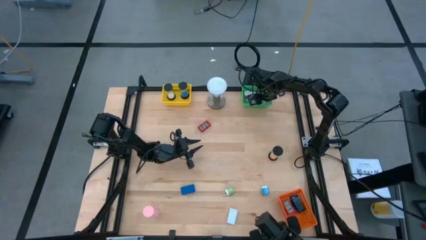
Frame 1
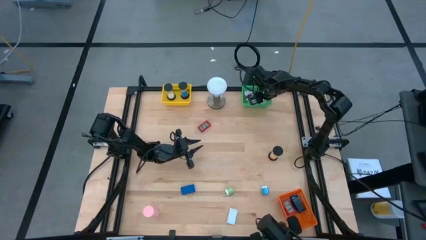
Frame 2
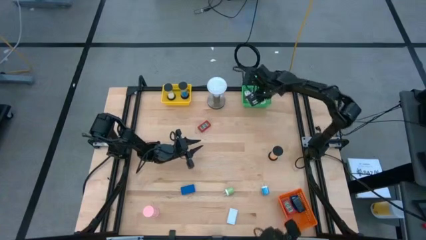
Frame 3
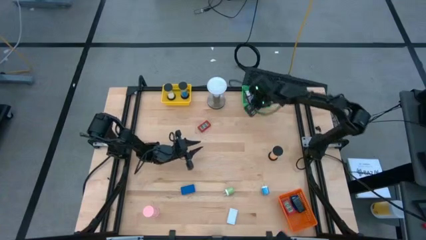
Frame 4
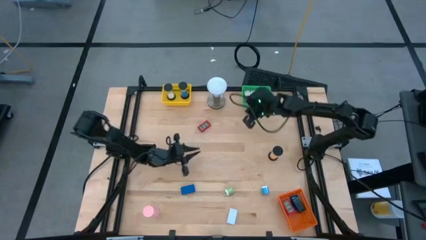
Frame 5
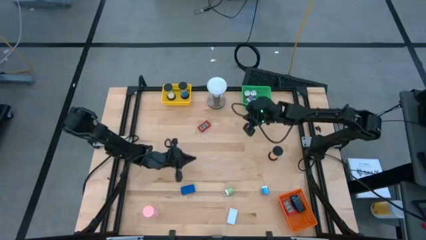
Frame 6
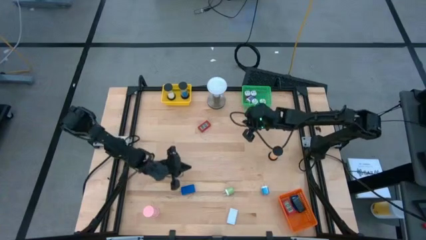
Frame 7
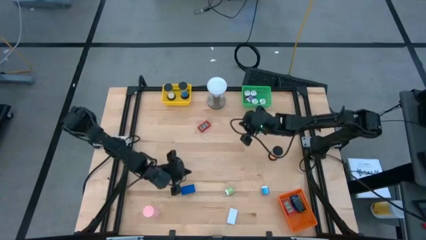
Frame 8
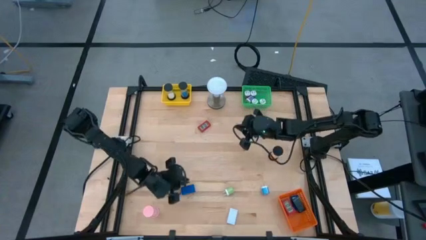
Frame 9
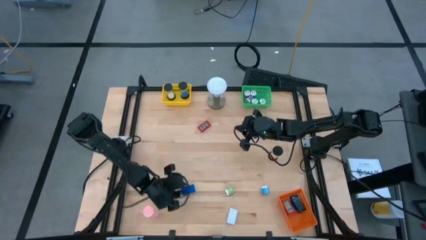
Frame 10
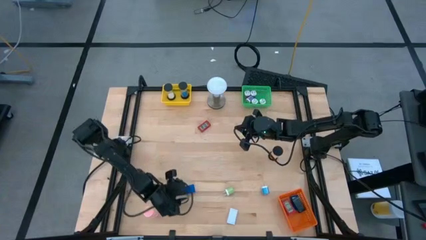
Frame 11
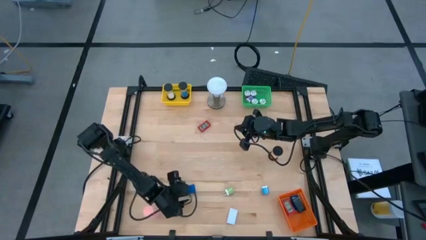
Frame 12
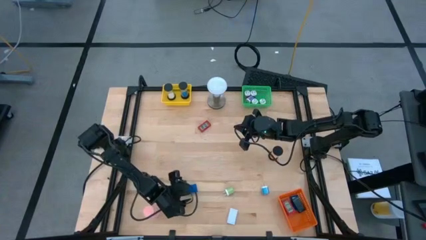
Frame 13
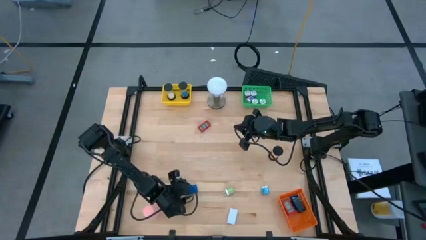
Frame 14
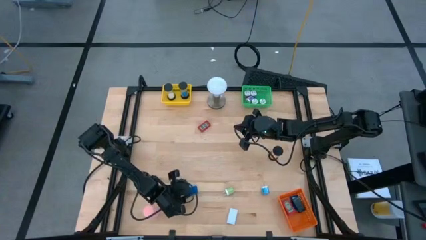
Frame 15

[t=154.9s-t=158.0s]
Task: Pick & Place Office items
Put the blue digital timer into the orange bin

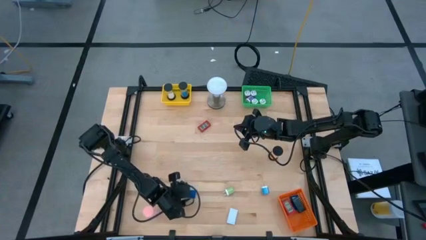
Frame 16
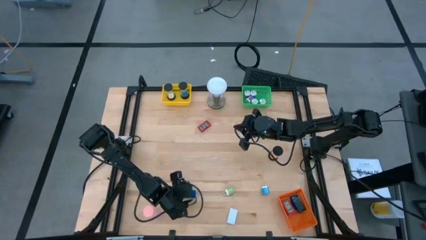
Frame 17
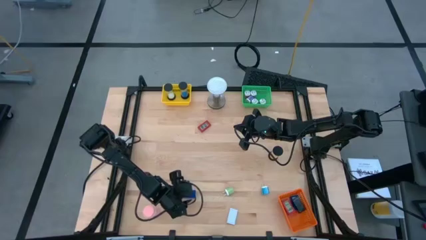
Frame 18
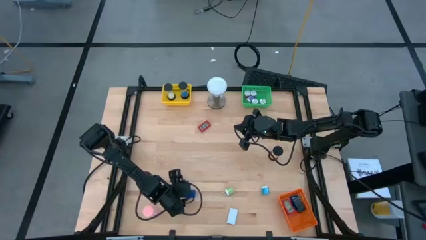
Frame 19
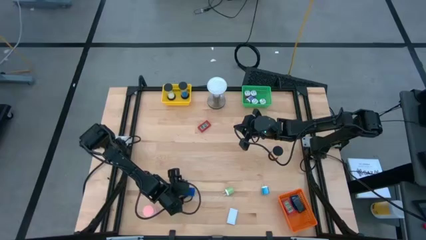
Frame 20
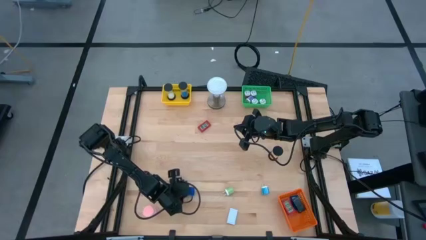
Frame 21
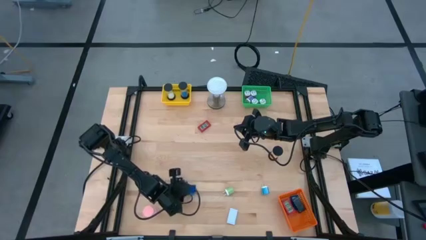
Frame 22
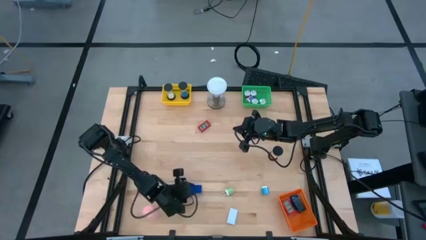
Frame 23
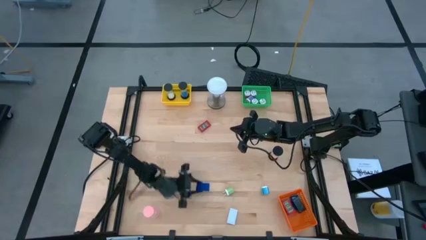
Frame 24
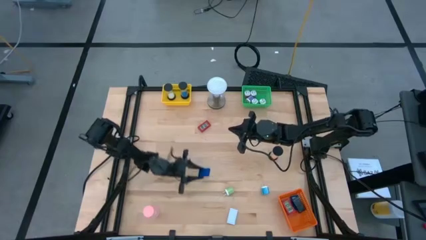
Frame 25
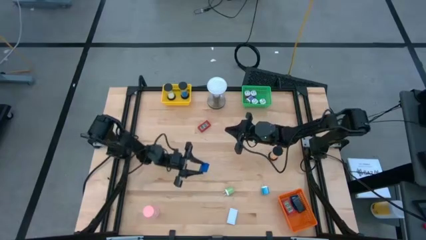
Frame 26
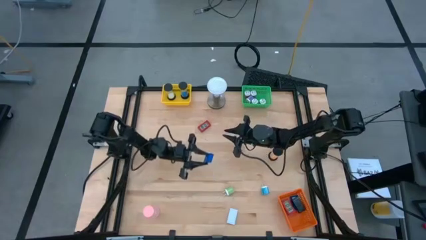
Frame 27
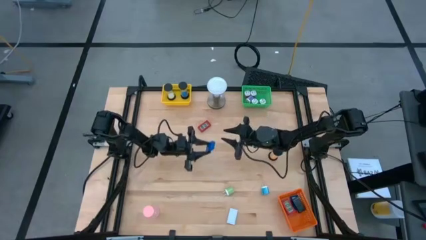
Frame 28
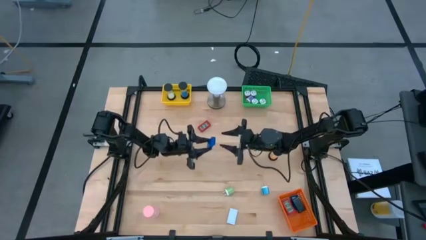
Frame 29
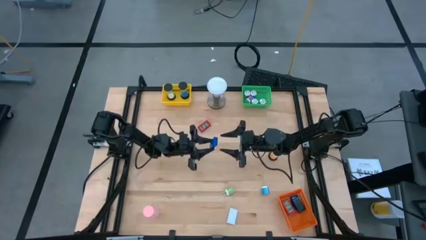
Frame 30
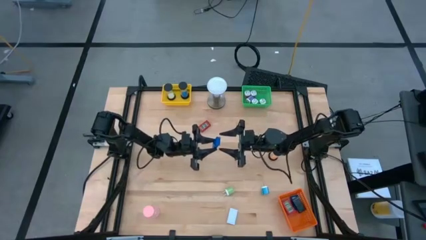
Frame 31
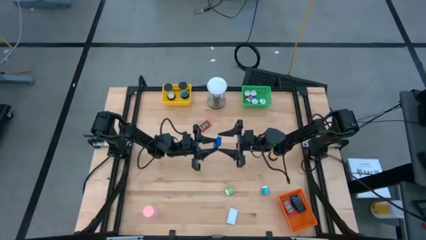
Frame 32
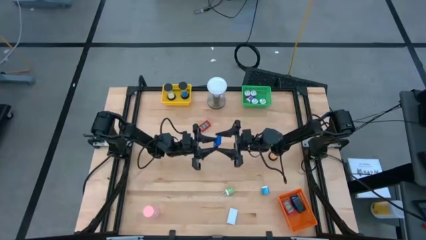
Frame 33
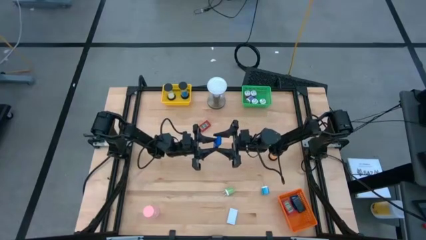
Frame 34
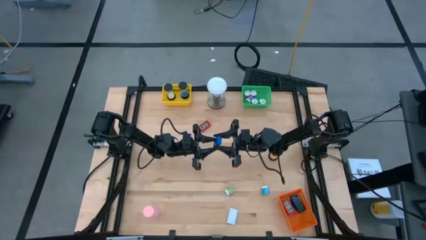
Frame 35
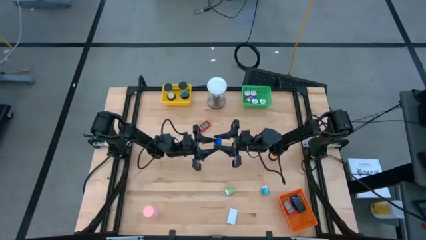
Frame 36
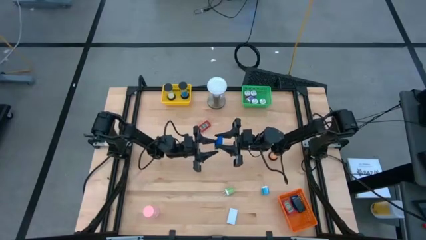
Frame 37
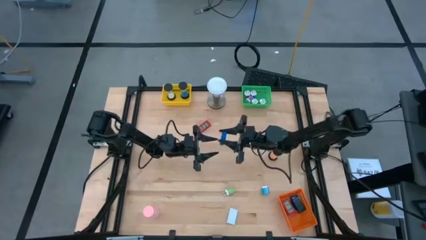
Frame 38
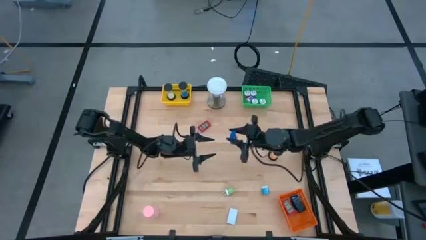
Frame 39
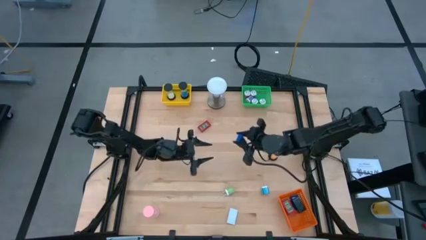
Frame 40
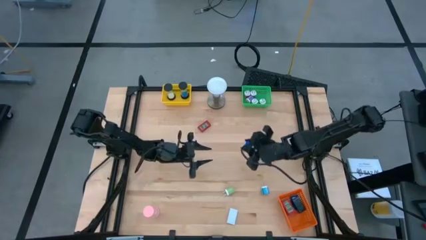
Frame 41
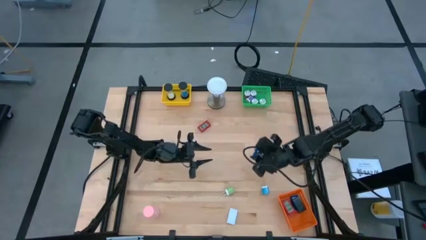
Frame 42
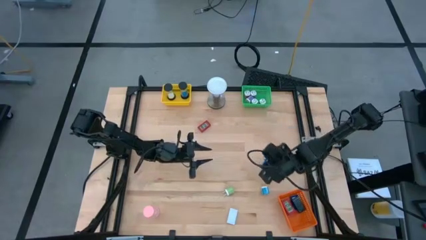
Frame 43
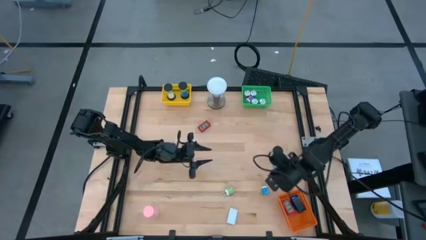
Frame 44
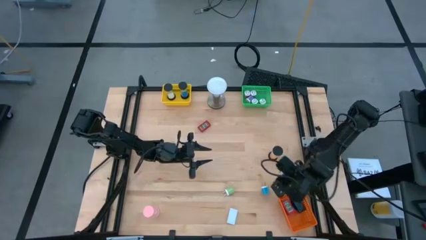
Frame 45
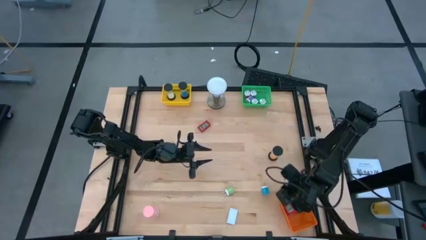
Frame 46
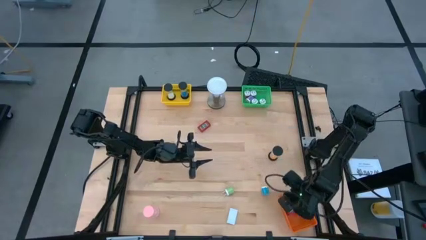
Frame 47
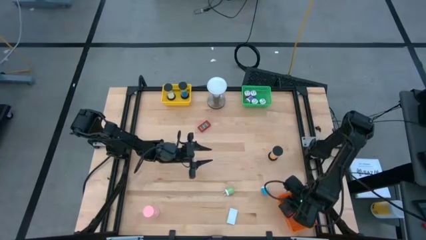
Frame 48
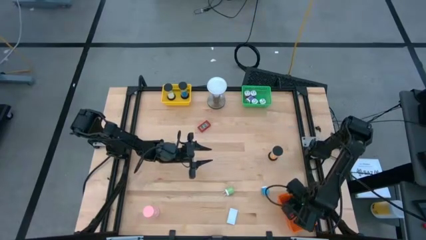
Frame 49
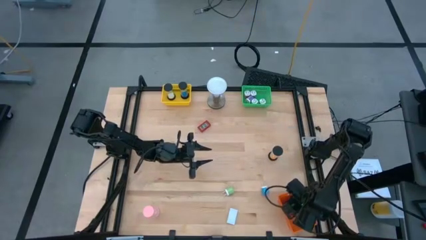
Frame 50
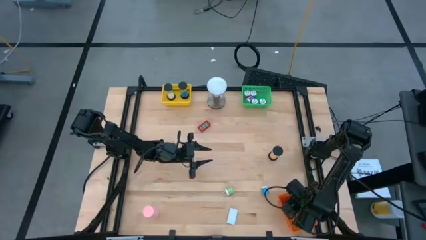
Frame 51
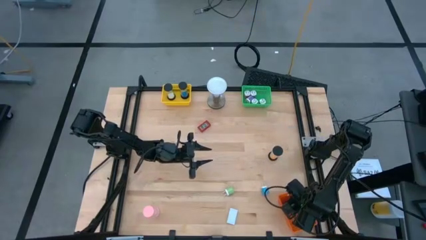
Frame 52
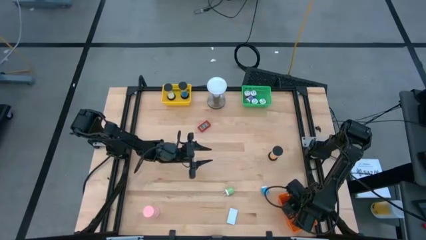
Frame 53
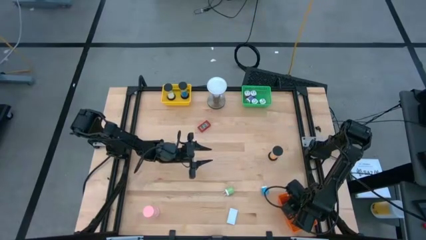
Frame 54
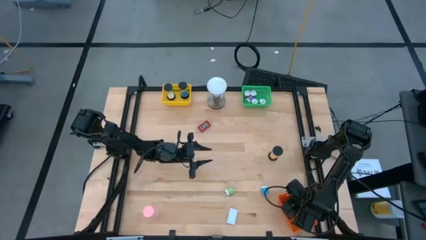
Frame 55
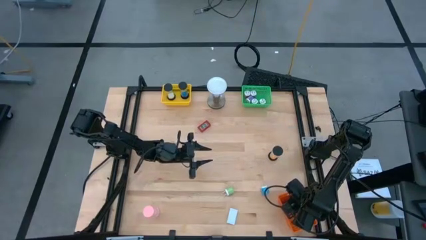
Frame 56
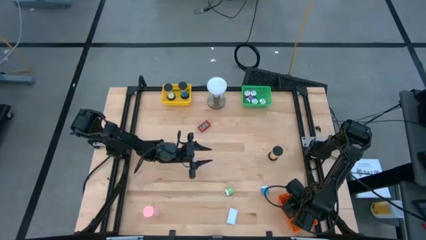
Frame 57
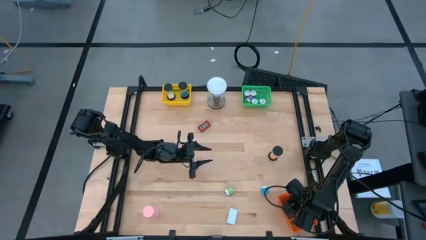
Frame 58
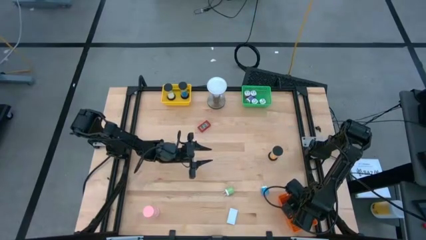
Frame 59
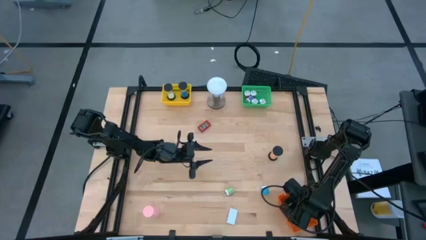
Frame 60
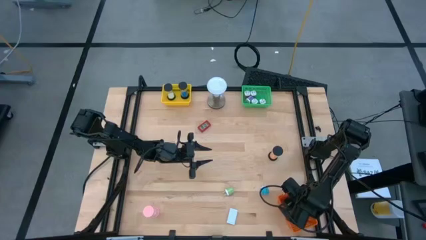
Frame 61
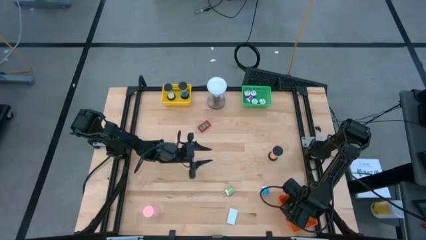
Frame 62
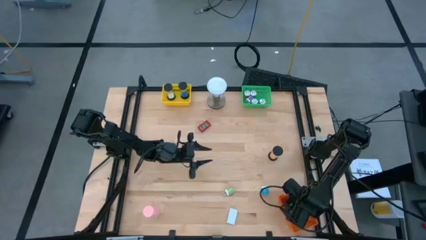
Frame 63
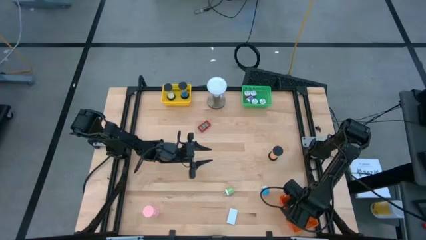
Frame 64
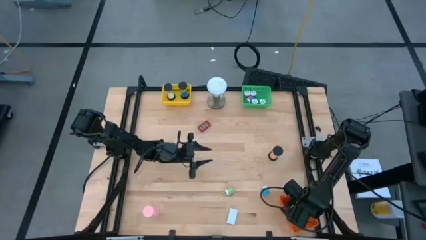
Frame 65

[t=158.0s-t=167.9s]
Put the blue digital timer into the orange bin
